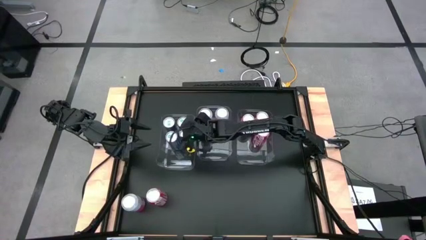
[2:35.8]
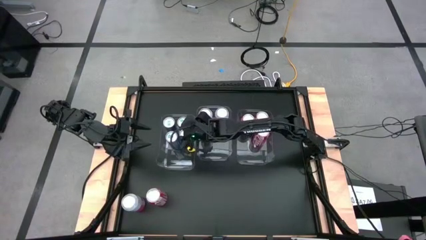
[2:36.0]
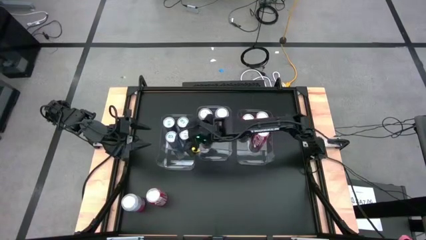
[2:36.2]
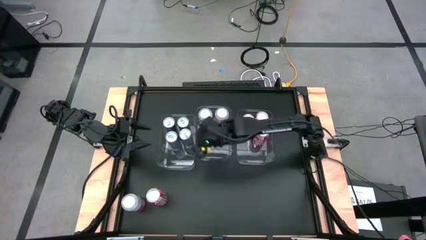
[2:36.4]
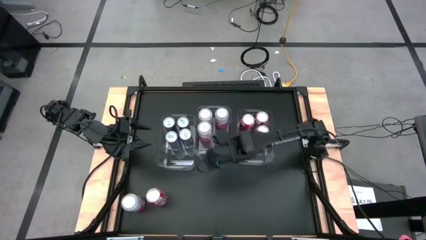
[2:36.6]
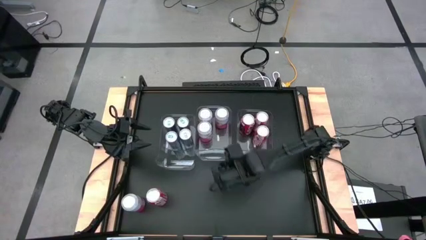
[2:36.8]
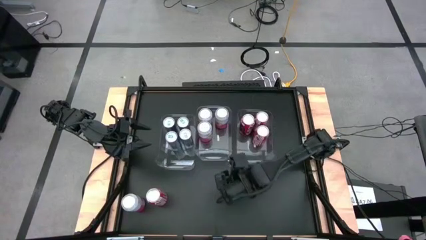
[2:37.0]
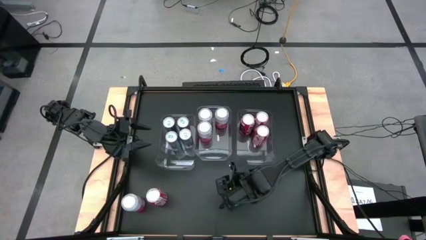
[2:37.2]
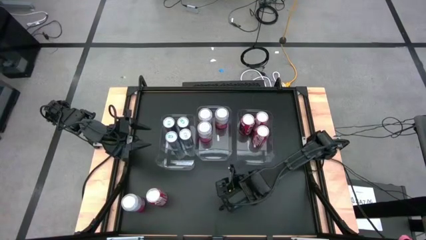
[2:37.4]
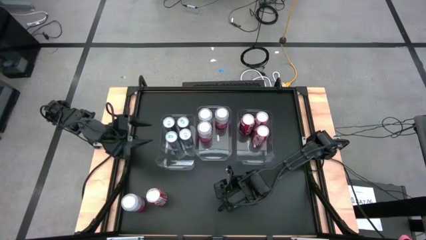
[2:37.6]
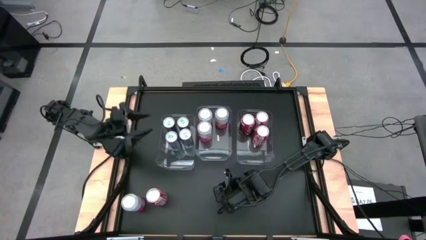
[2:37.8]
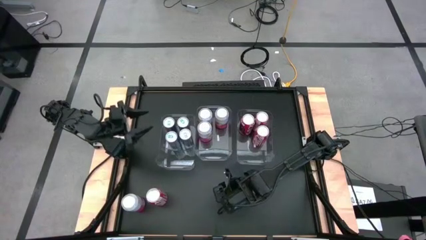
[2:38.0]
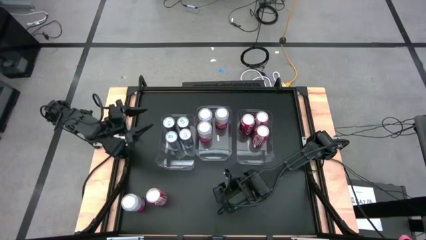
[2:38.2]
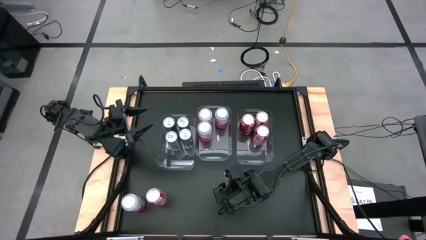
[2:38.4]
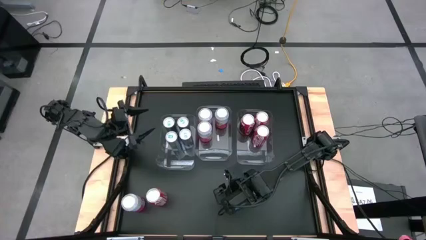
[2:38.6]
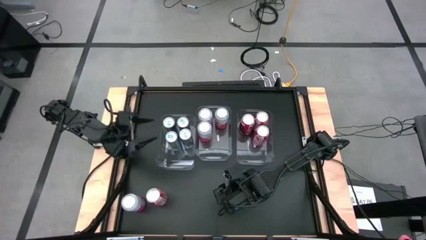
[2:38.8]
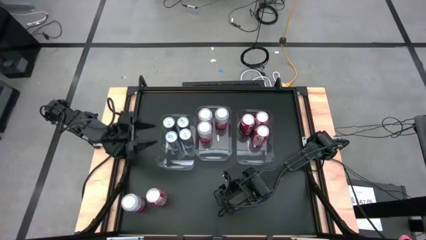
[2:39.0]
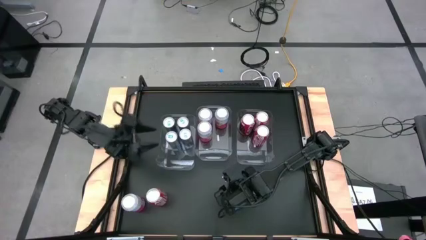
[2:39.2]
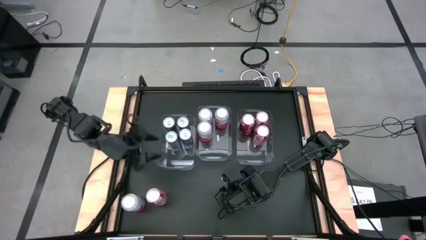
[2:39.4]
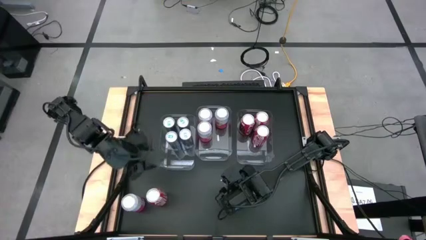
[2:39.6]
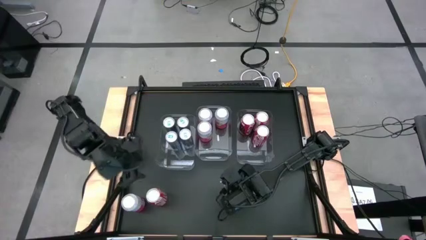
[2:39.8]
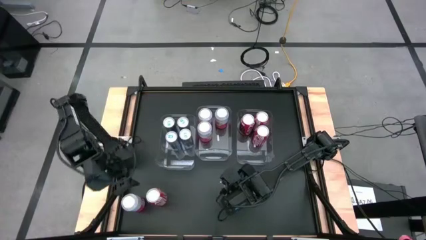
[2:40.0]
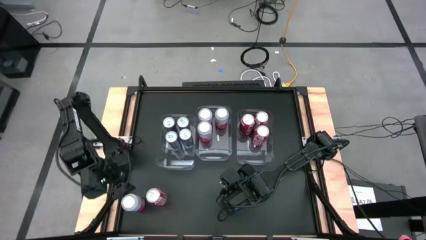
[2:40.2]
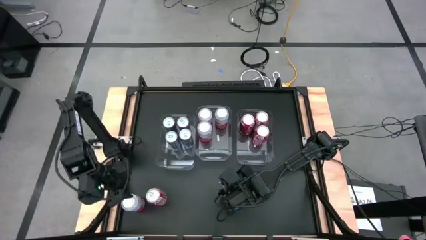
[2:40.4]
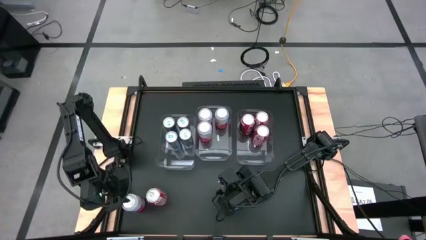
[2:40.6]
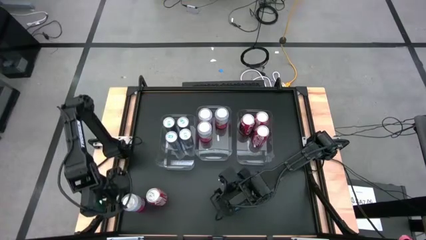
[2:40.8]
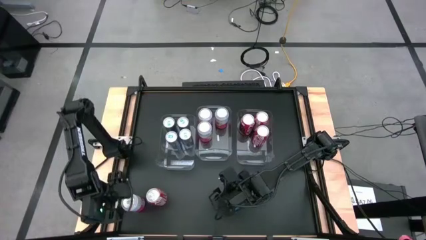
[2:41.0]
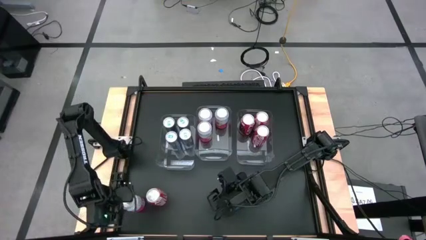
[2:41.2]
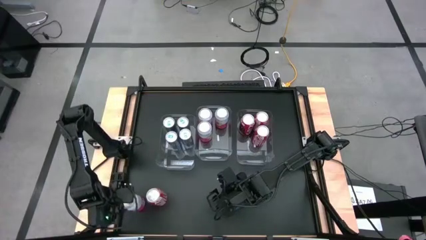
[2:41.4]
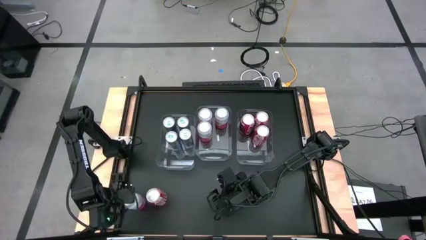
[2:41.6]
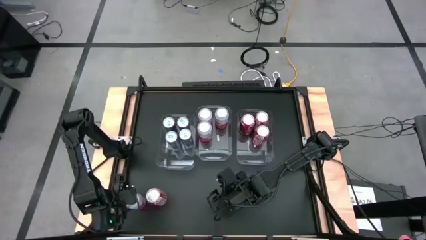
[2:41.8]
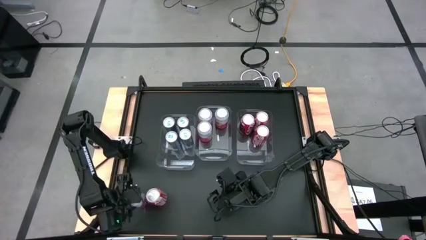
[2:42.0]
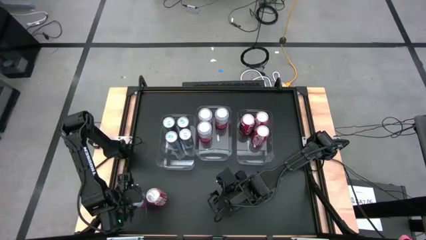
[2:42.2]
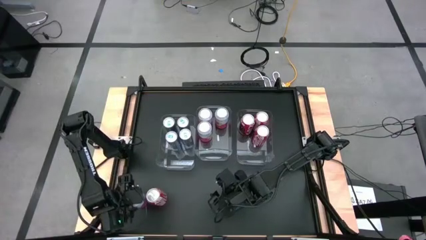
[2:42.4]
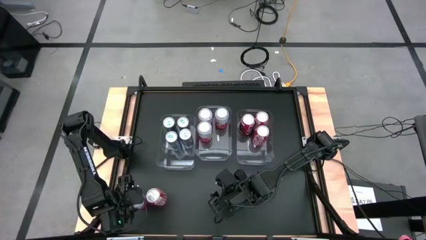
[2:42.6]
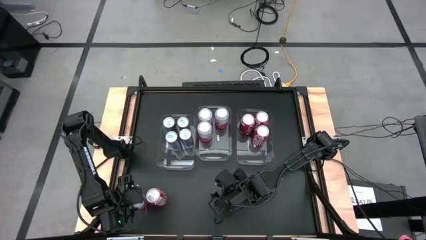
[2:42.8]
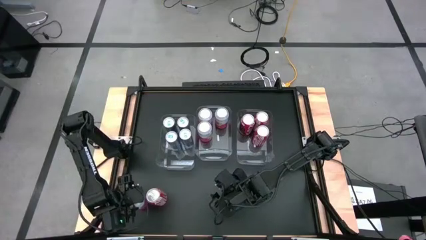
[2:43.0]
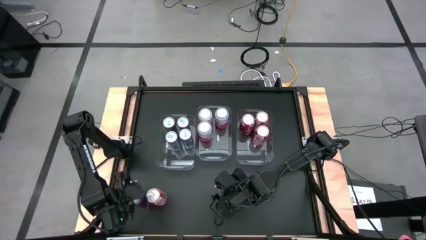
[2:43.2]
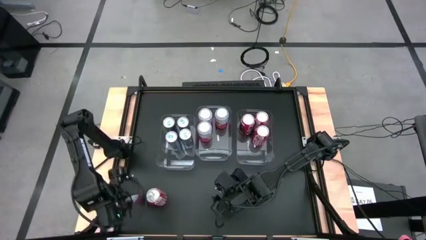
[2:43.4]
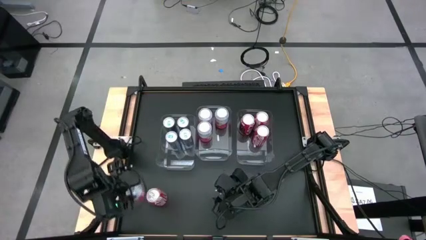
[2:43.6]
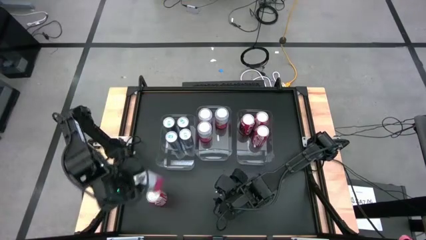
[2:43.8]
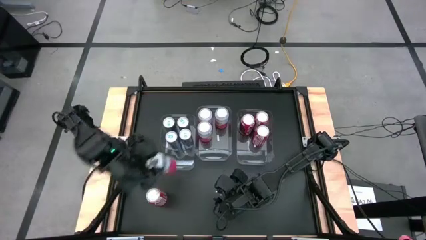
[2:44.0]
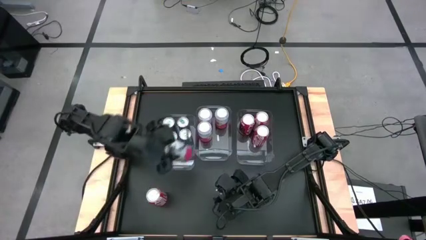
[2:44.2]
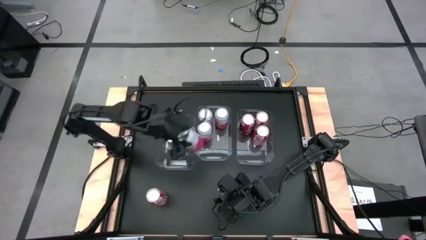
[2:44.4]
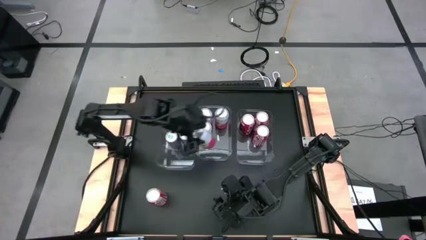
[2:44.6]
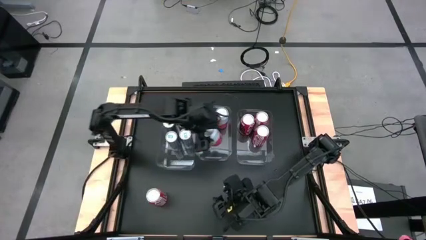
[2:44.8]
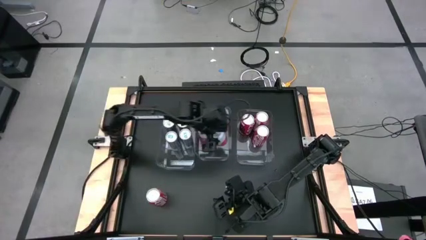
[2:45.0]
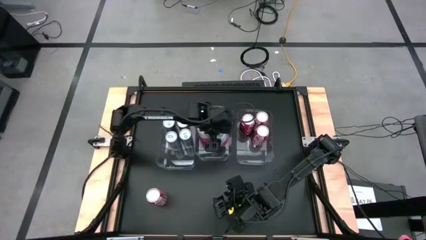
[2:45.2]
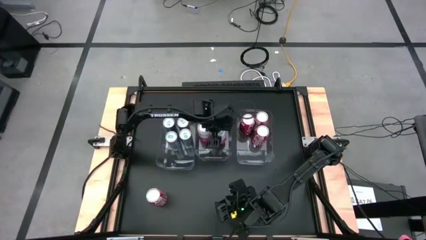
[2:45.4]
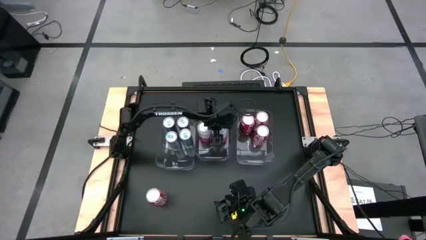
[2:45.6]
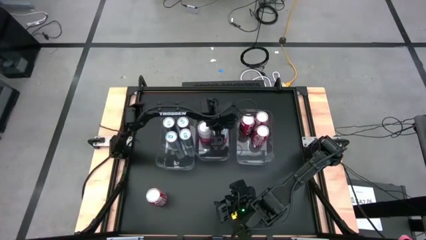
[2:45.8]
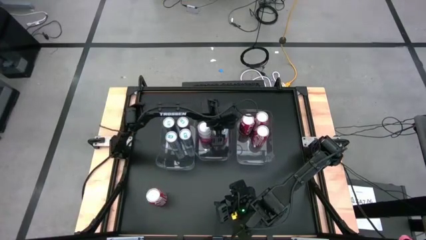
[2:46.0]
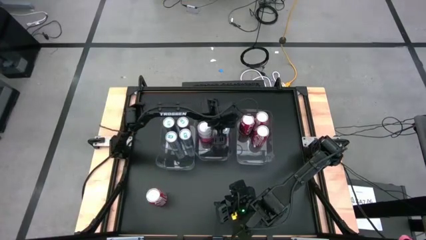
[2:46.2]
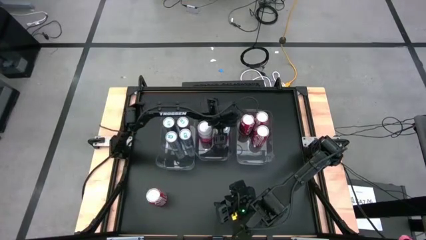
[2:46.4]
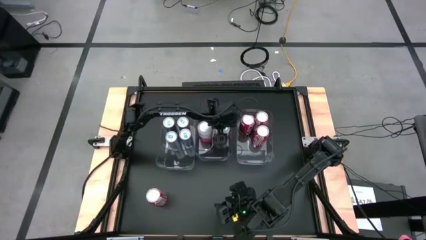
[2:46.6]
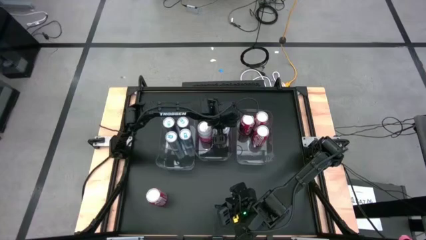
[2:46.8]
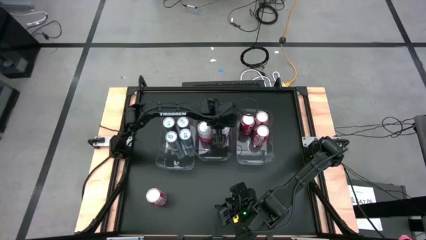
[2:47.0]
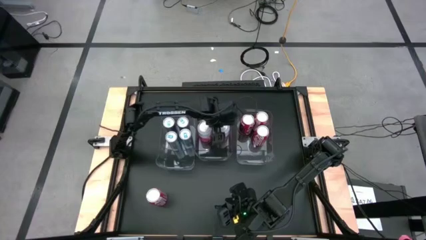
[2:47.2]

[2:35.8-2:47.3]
Task: Sort soda cans
Put the bottom left red and white soda can into the middle transparent bin

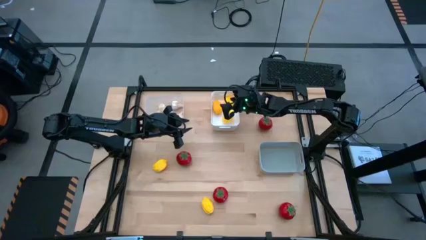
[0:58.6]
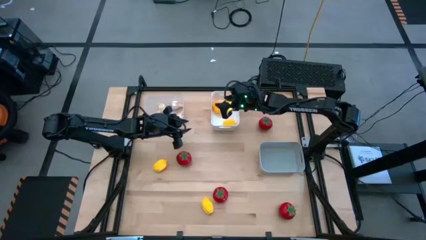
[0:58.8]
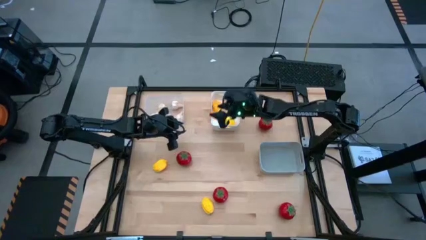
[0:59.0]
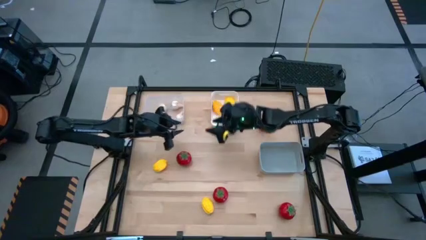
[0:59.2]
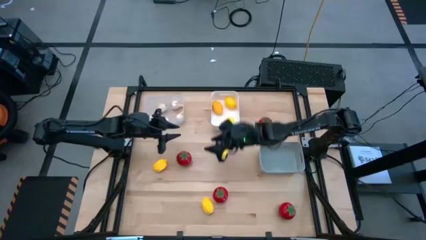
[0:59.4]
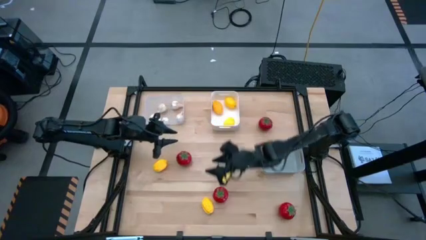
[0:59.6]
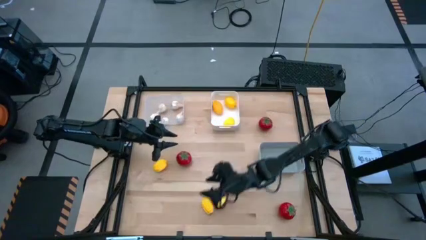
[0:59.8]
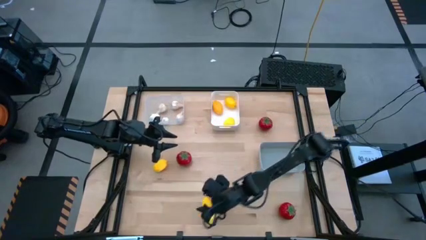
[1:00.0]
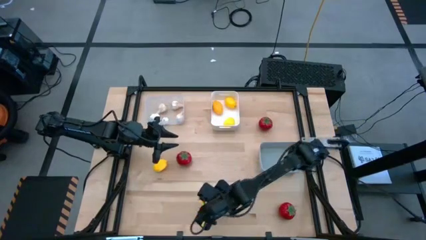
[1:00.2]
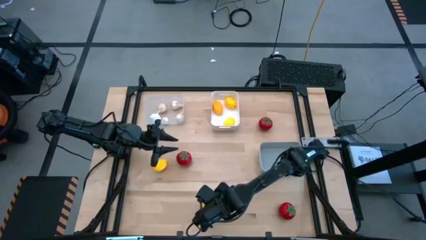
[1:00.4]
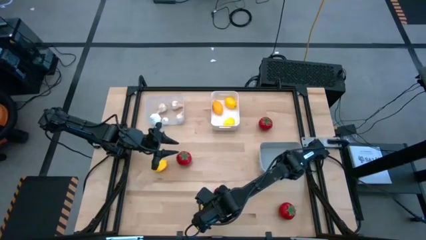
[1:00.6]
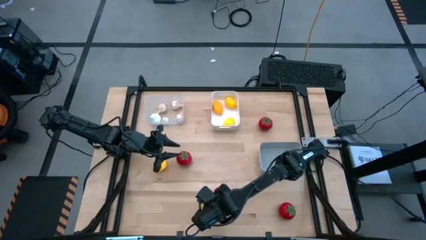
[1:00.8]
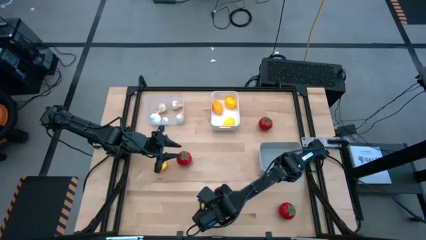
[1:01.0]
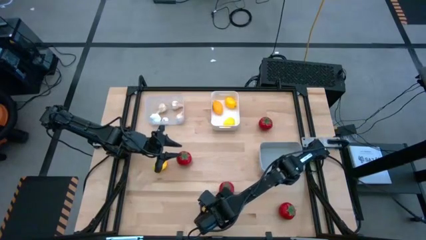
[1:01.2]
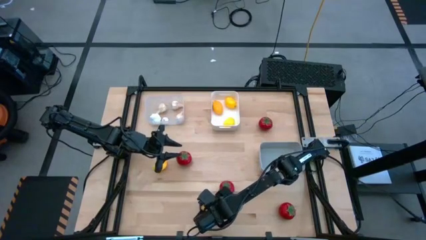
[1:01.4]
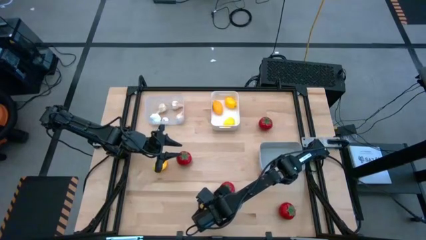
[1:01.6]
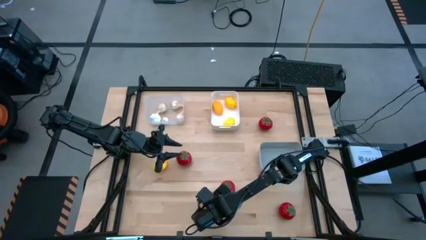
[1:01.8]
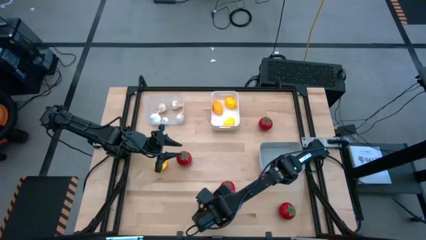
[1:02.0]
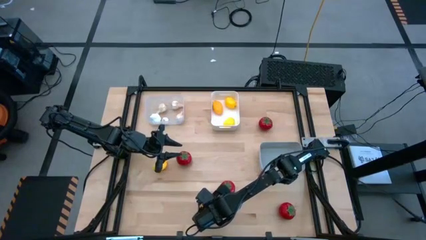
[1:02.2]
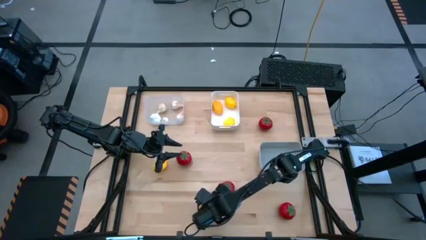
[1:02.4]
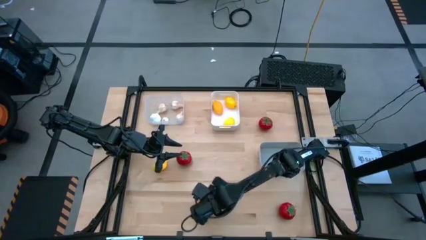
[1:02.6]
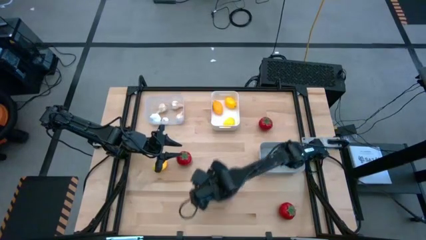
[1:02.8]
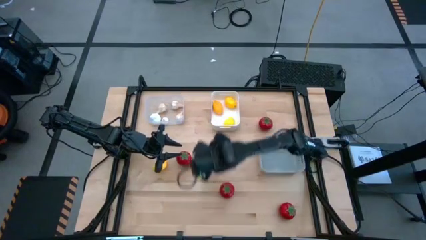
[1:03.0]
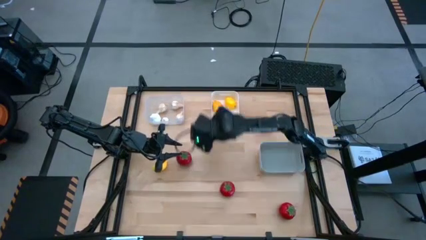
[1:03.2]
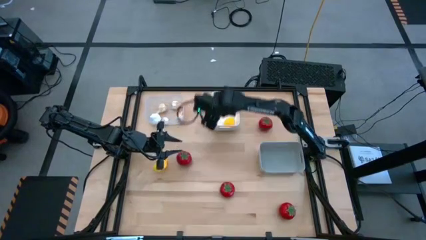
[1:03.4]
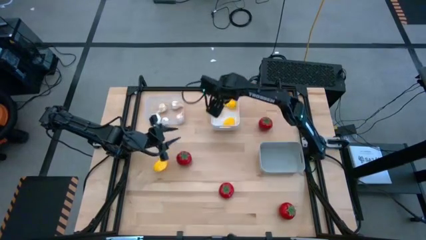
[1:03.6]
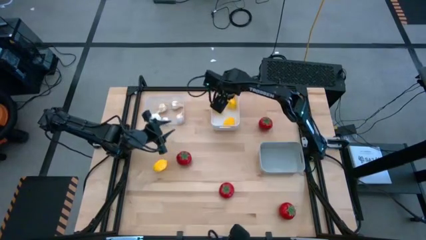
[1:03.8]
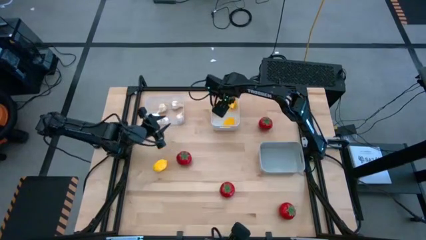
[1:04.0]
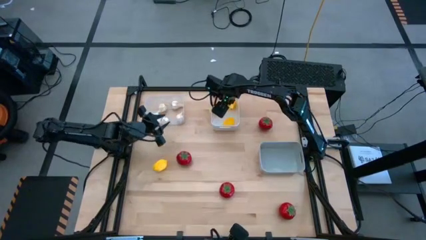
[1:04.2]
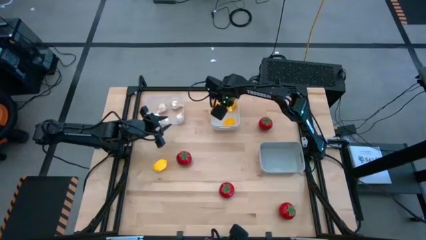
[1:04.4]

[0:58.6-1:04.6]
Task: Sort produce into baskets
Put the lemon into the white bin
